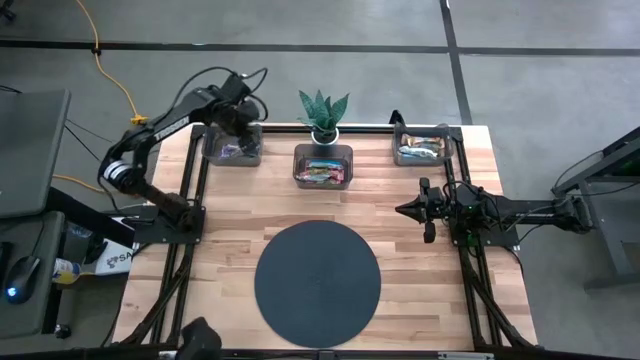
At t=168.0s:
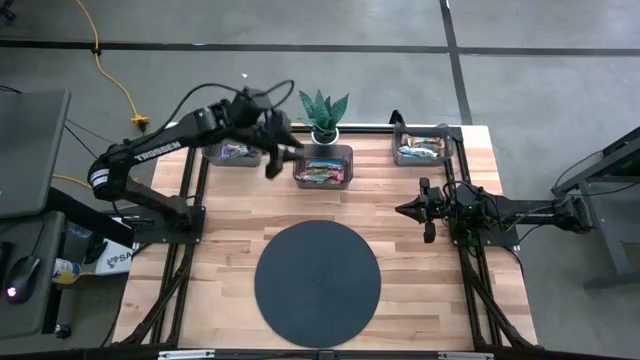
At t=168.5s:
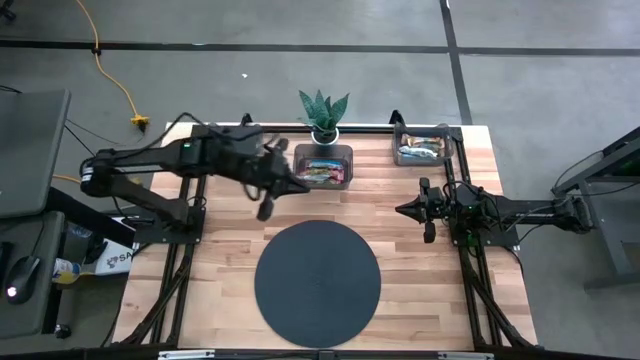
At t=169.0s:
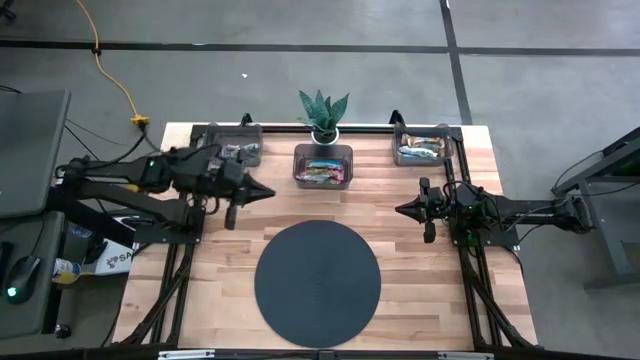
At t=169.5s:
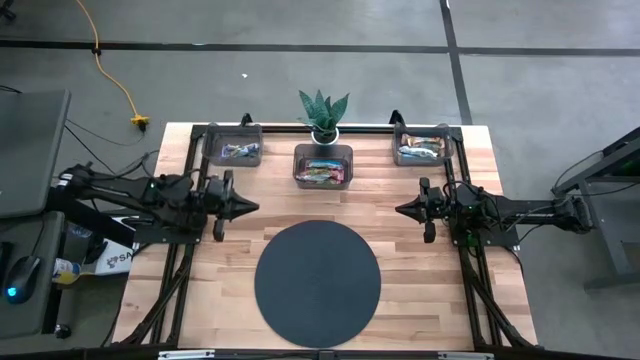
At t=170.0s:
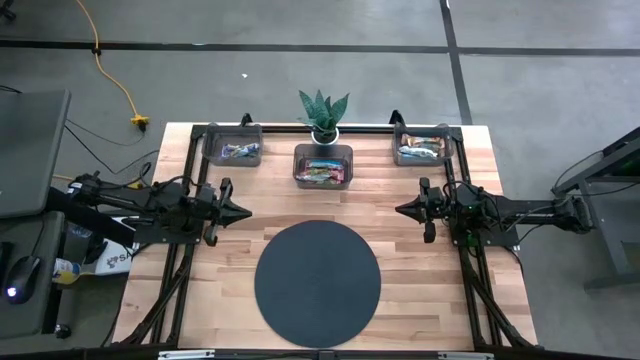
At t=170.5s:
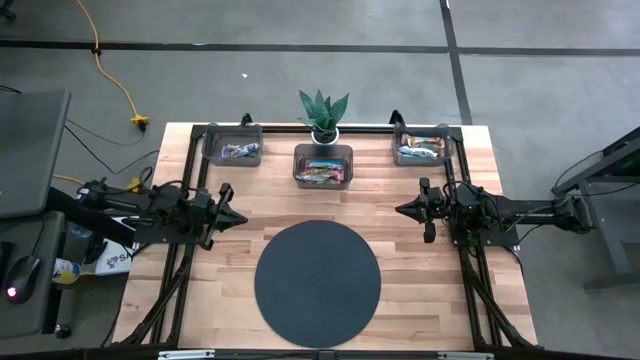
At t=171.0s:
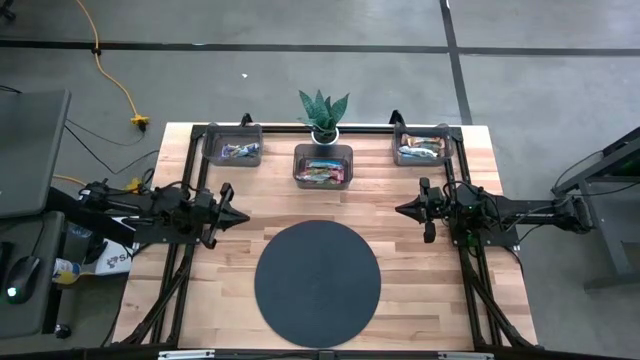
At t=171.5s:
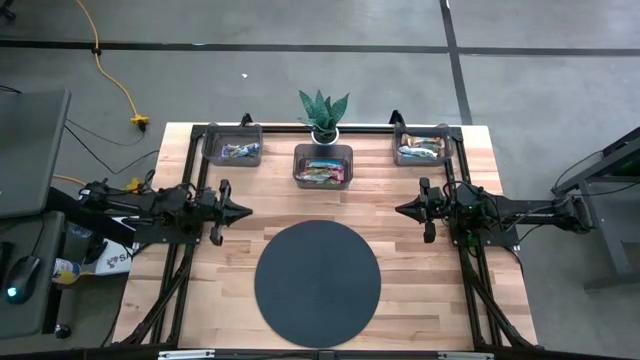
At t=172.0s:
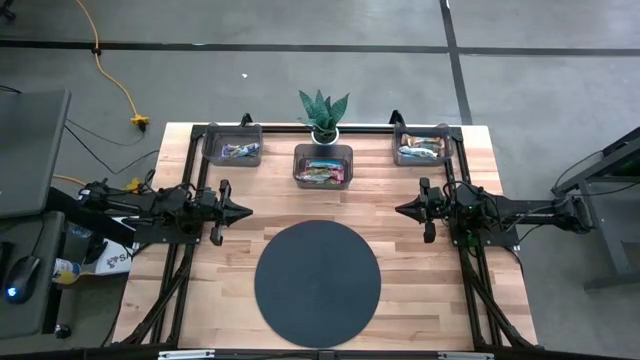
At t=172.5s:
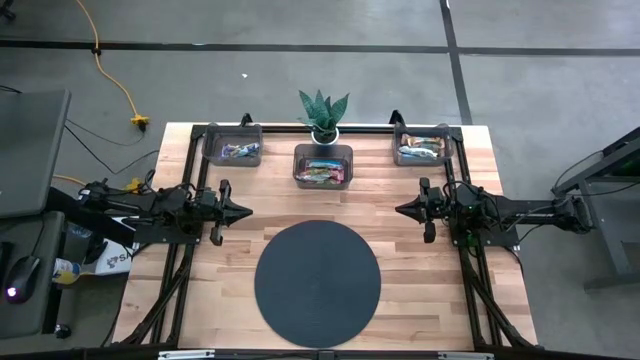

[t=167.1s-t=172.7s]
Task: Pick and place Granola Bars by type
Return to Home Position

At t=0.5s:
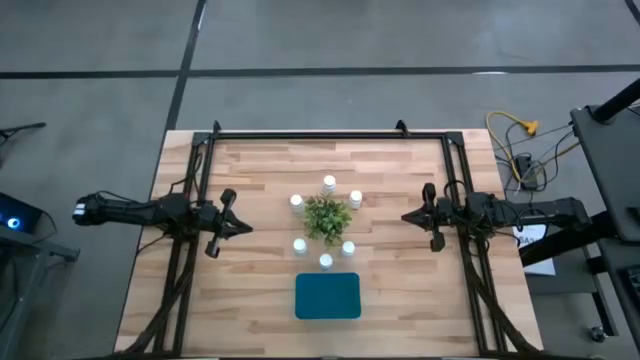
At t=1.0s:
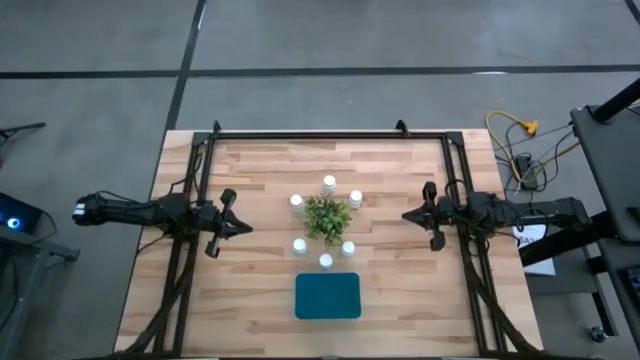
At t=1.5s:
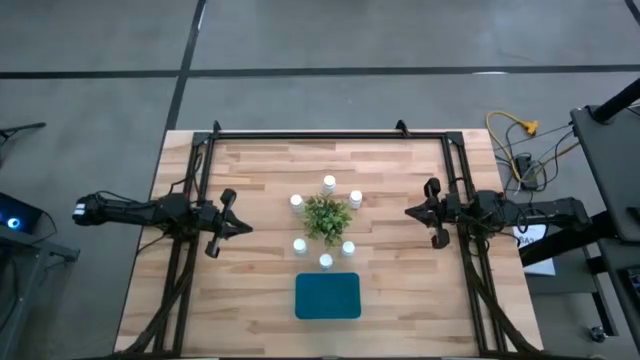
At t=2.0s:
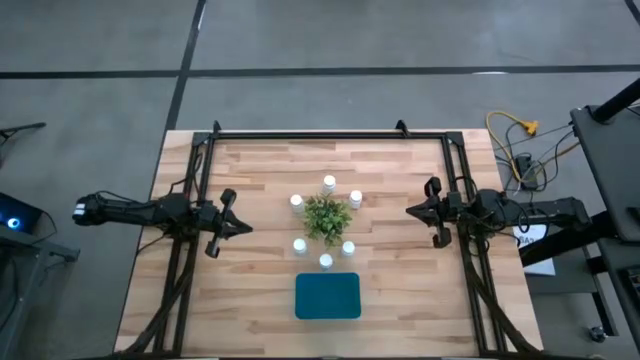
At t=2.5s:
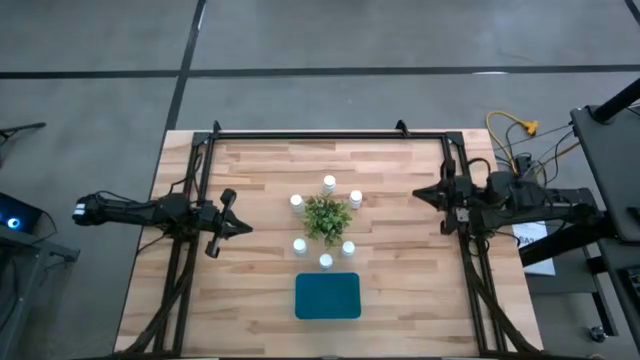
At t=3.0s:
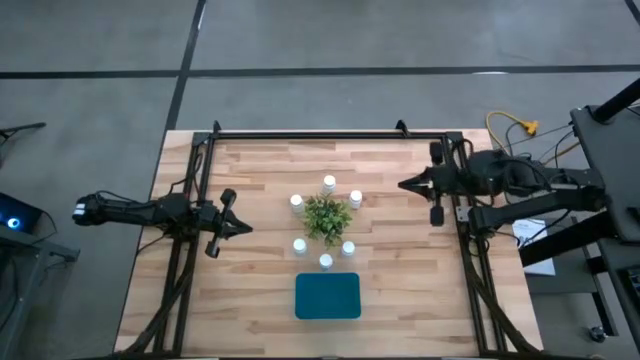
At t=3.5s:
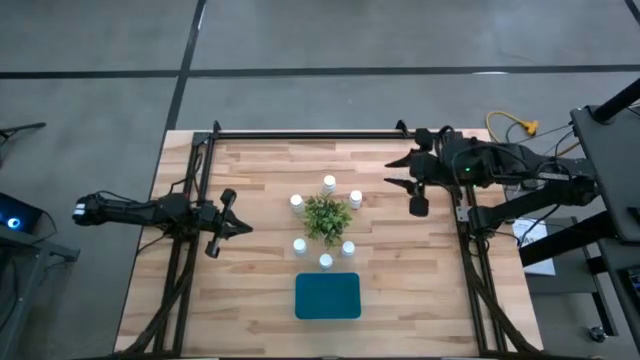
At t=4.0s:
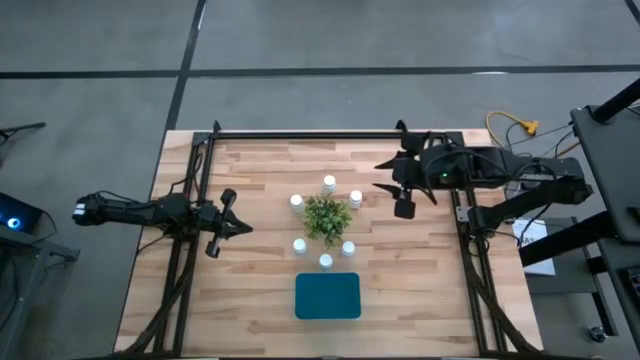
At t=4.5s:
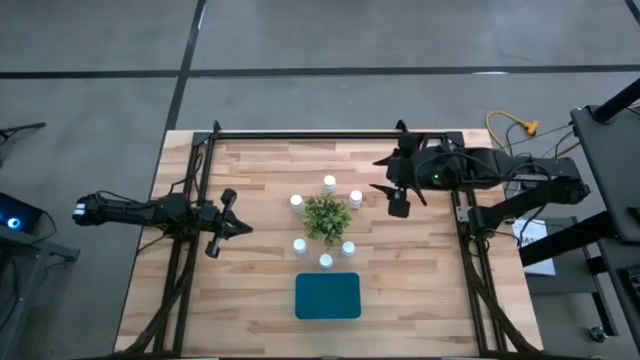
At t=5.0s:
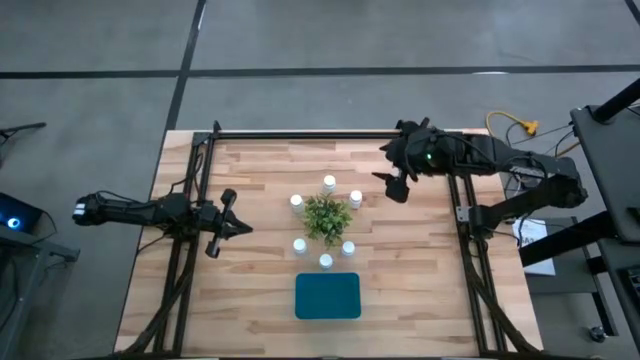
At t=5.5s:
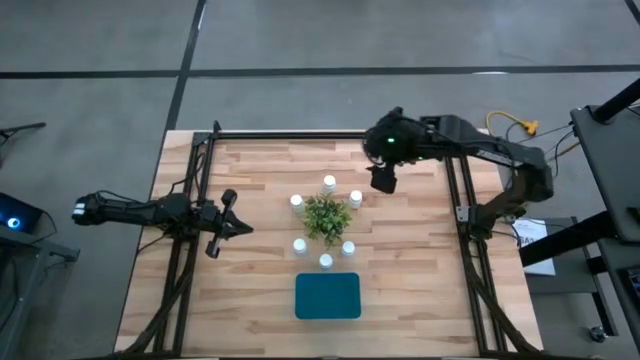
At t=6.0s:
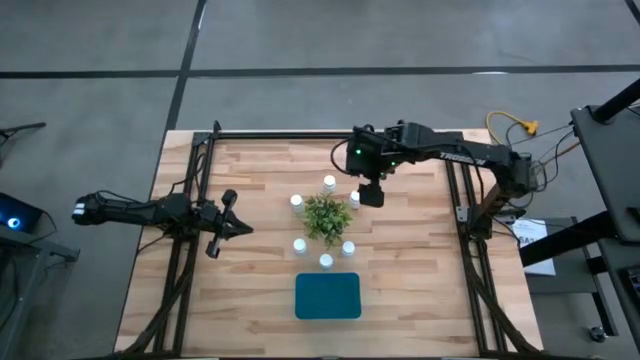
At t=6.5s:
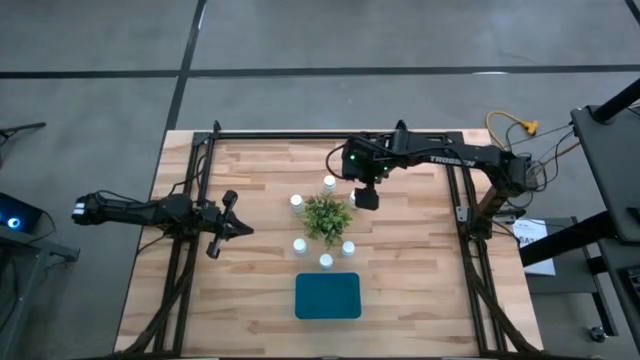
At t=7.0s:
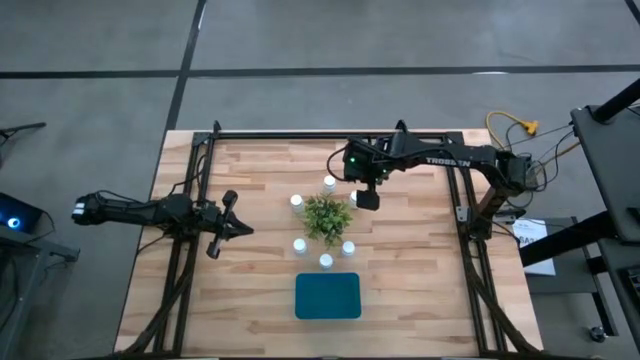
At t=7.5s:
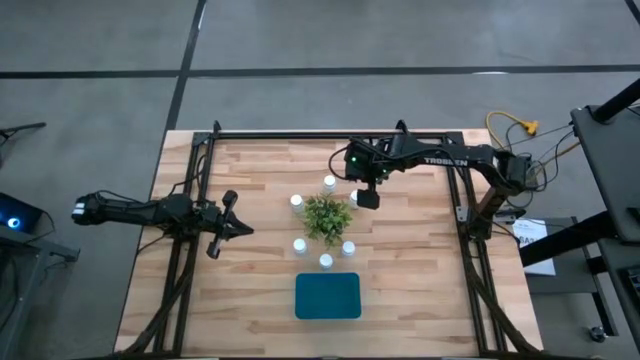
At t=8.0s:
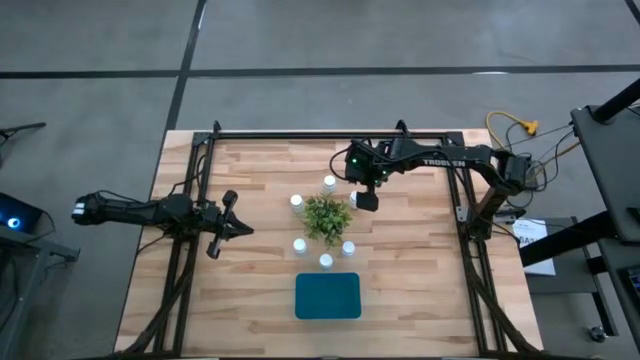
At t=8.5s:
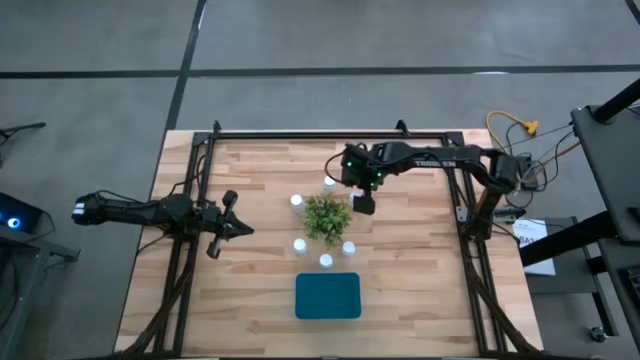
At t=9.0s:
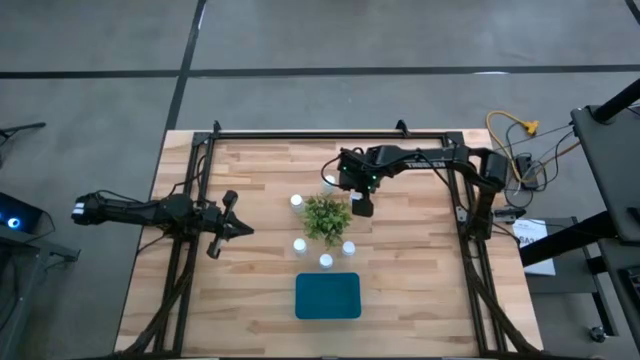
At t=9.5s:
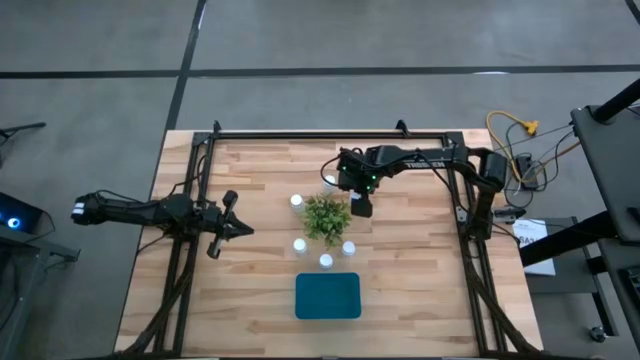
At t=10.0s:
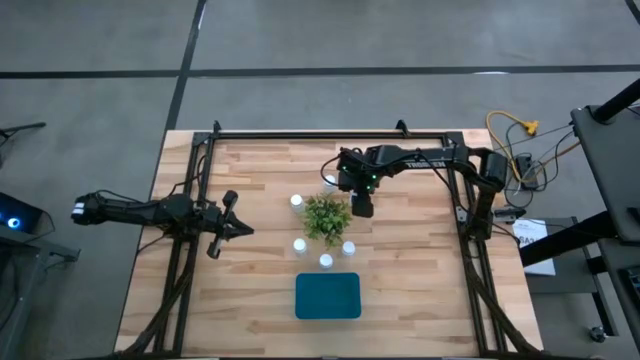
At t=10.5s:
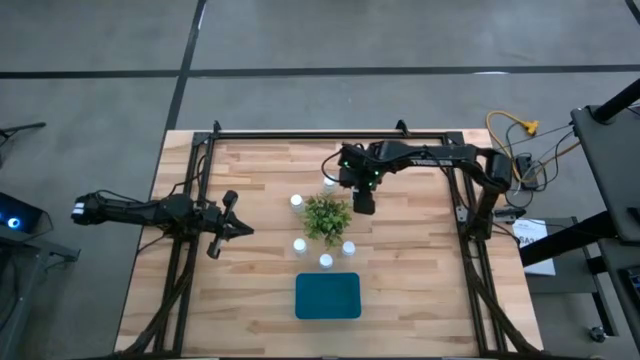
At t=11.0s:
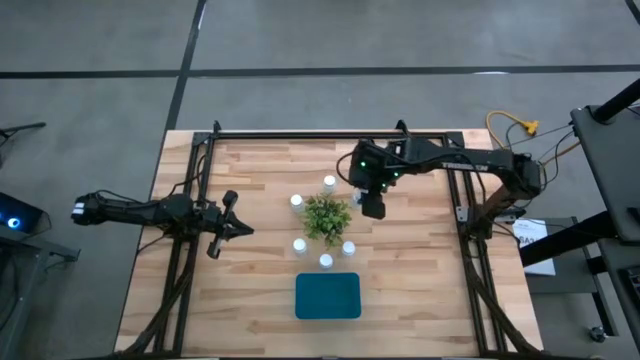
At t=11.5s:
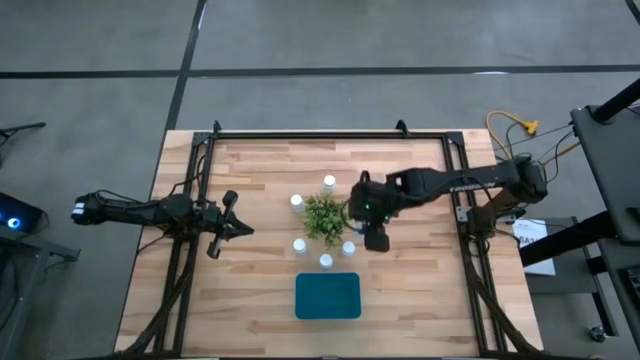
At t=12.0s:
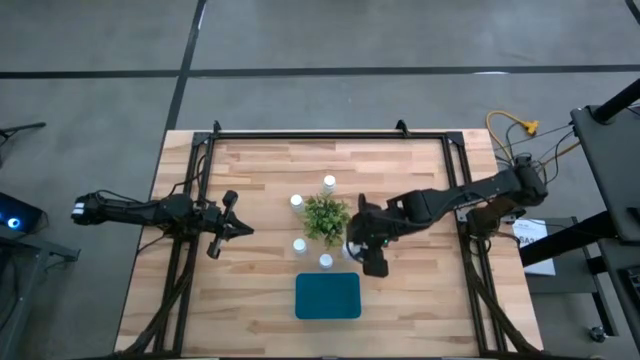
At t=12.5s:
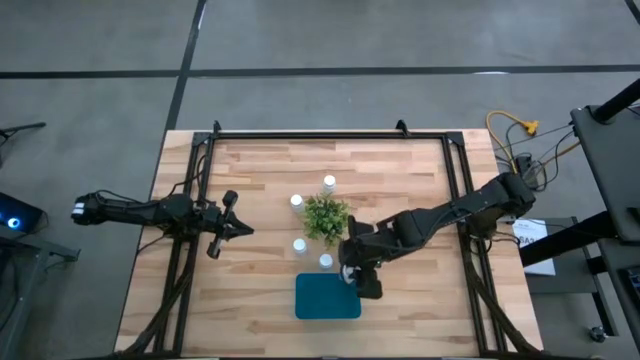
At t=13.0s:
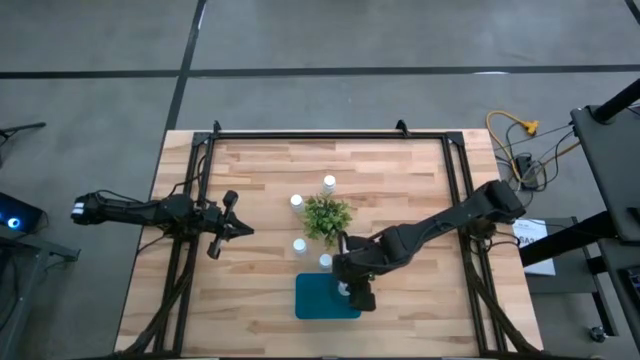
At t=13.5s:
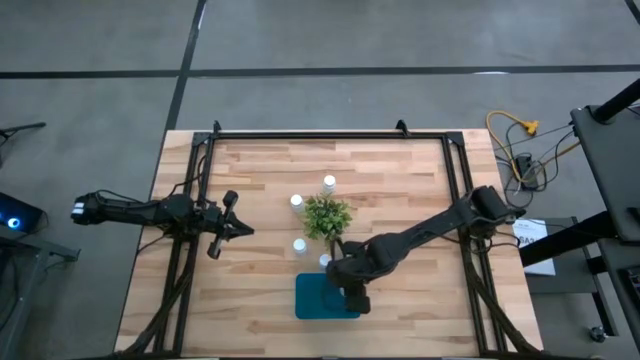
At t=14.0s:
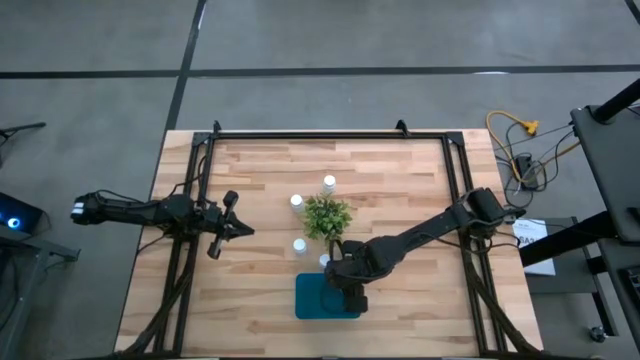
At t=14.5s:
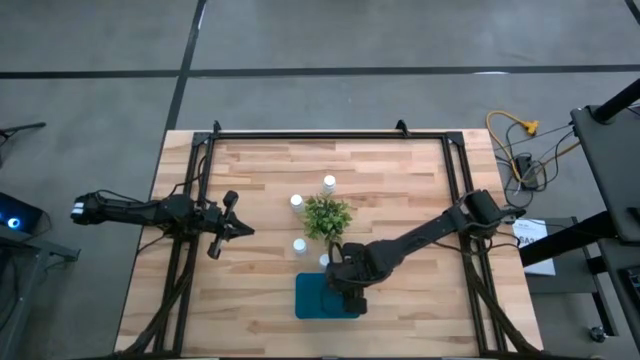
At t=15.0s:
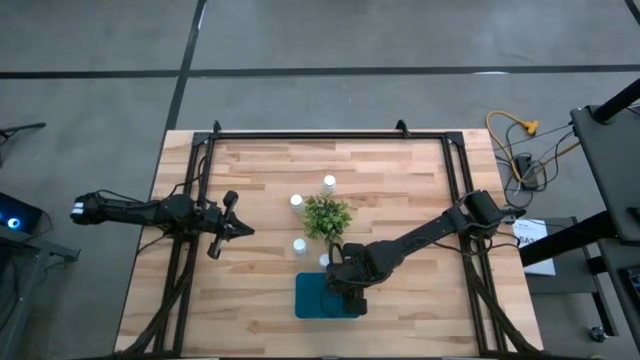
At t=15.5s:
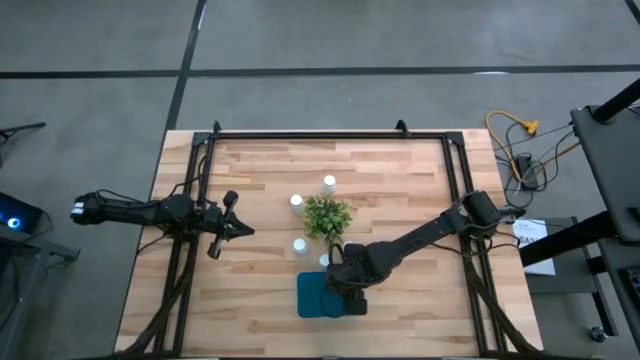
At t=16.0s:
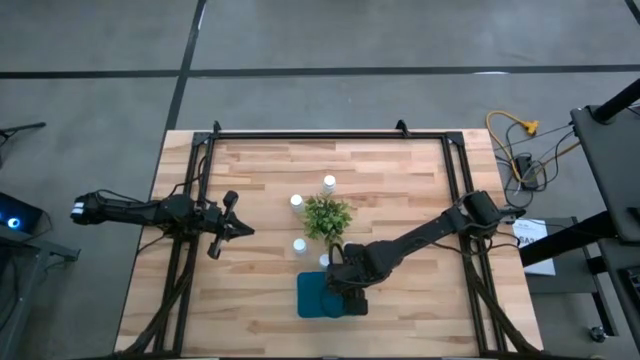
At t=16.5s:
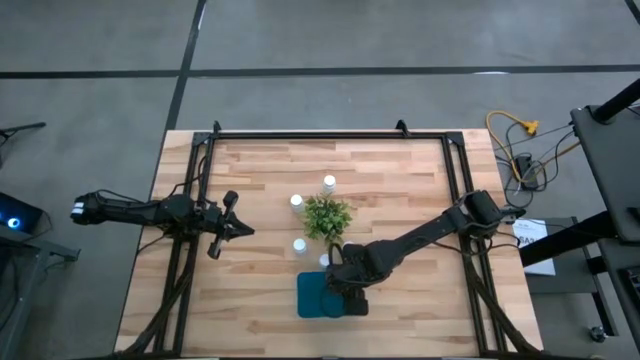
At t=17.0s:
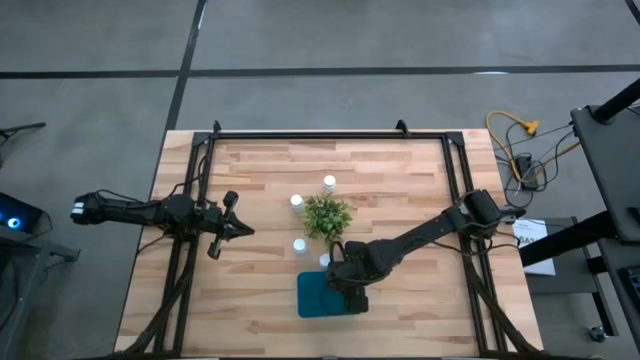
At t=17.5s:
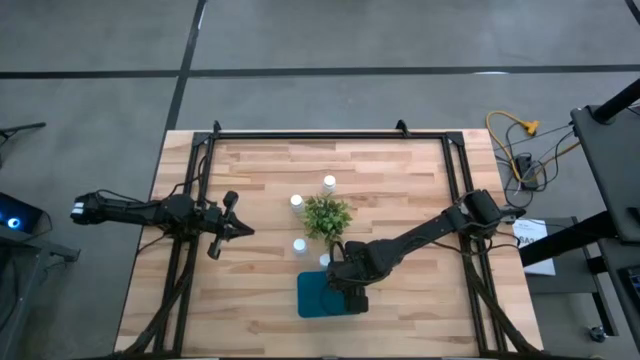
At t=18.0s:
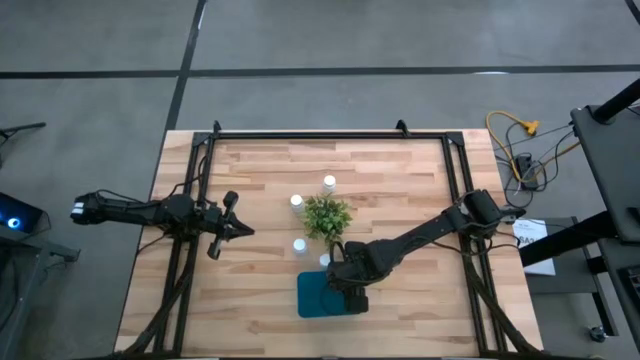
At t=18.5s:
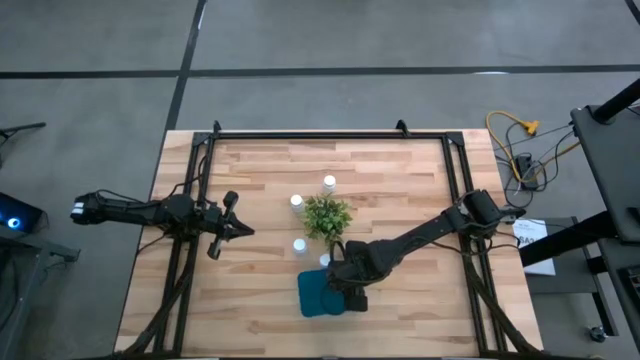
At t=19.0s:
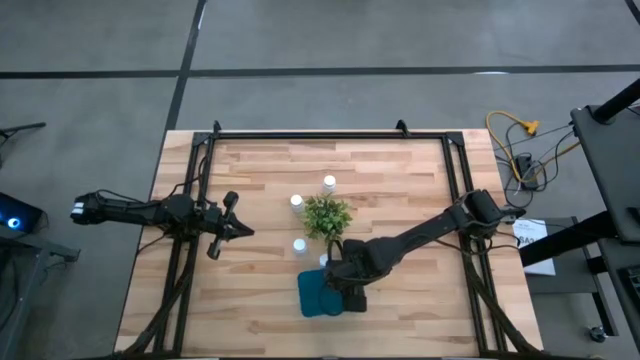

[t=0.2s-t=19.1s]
Task: Pick and place pill bottles into a basket
Put the white medicine bottle into the blue bin
